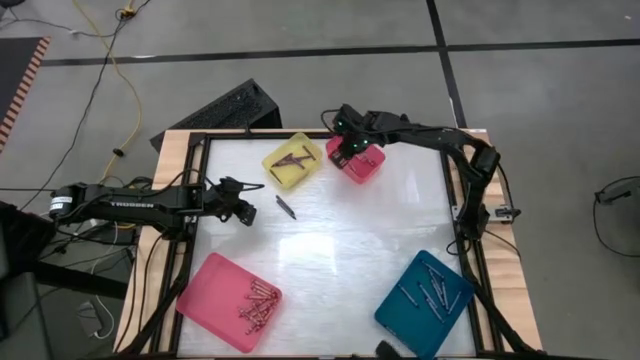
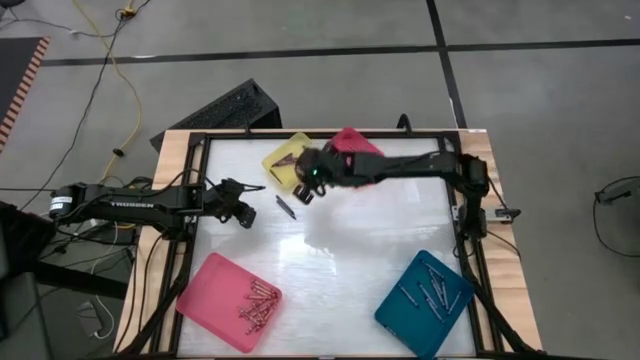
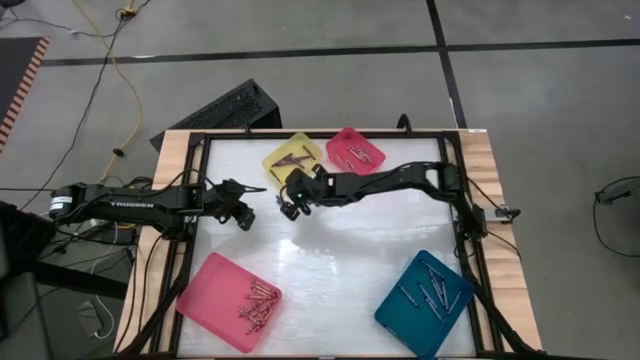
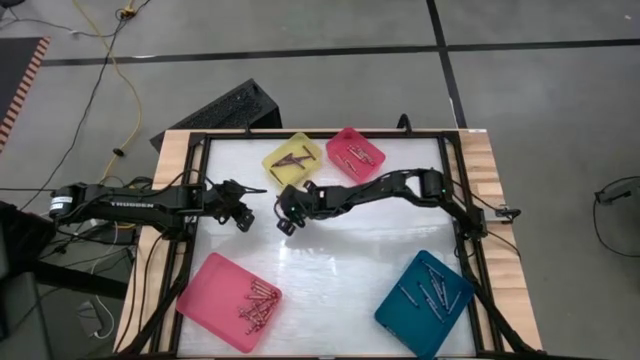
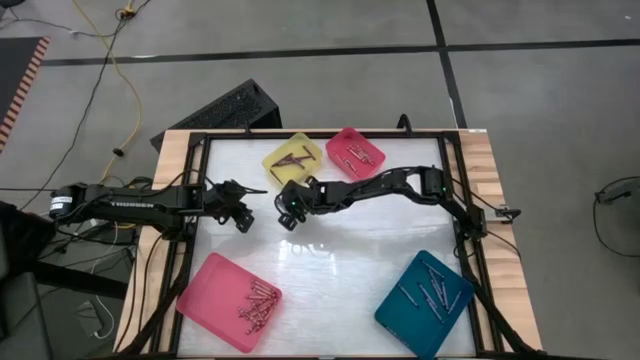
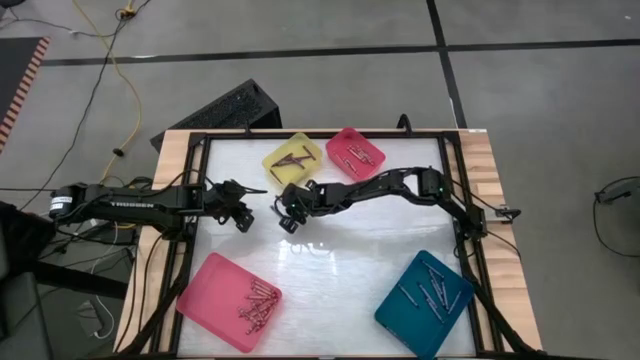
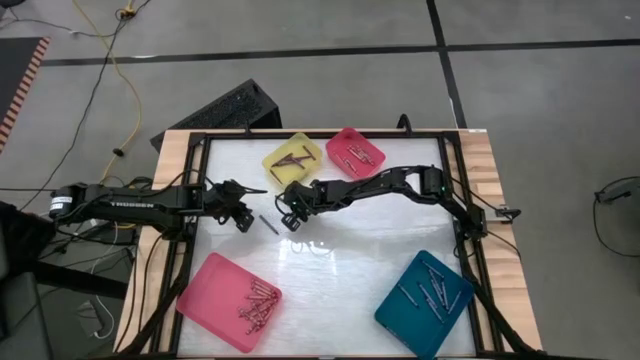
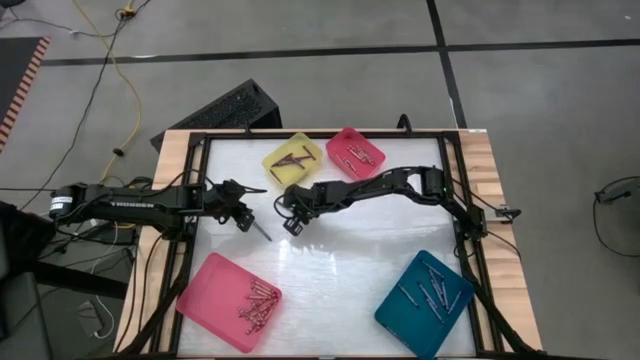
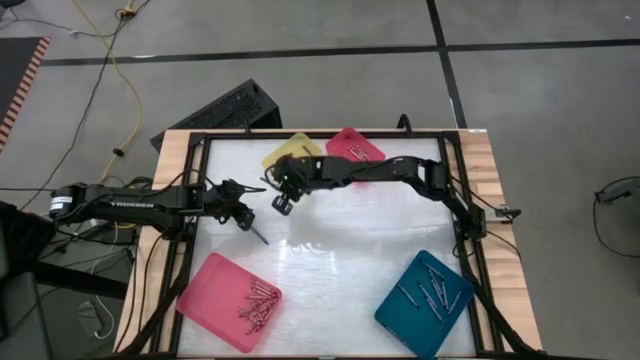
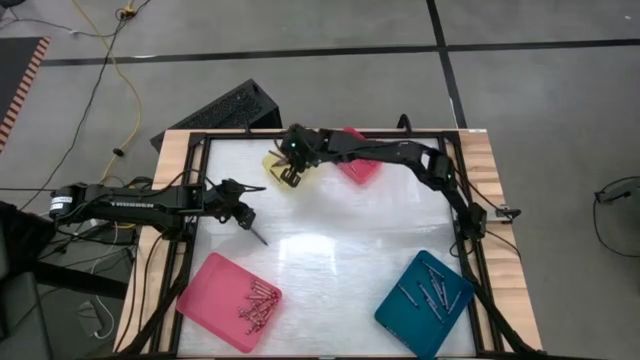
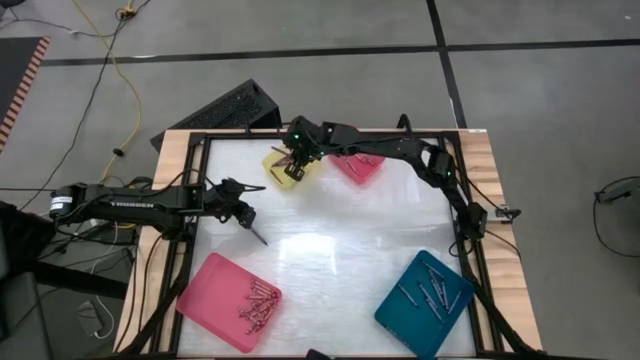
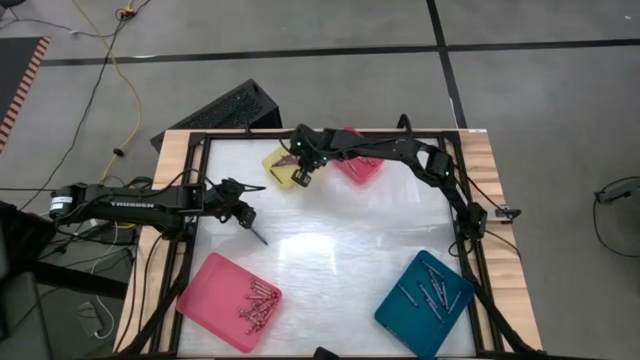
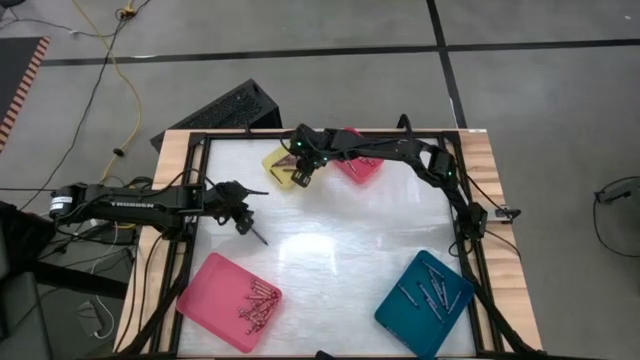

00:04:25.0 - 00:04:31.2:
Task: Sort crayons
Put the purple crayon into the yellow bin

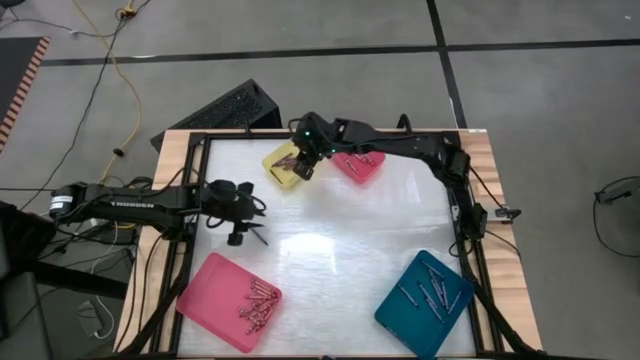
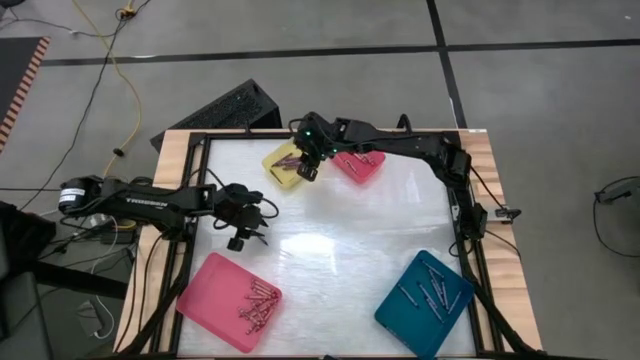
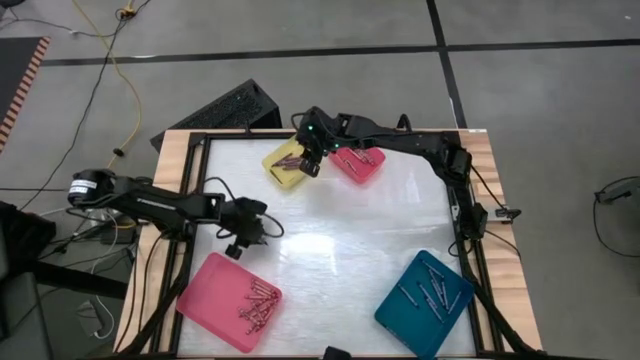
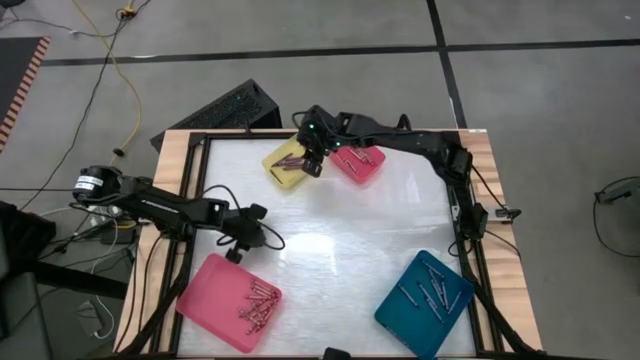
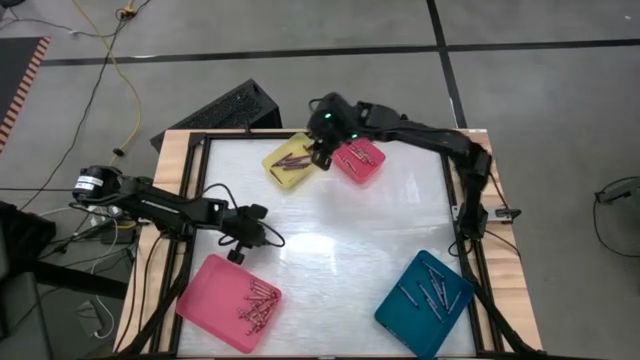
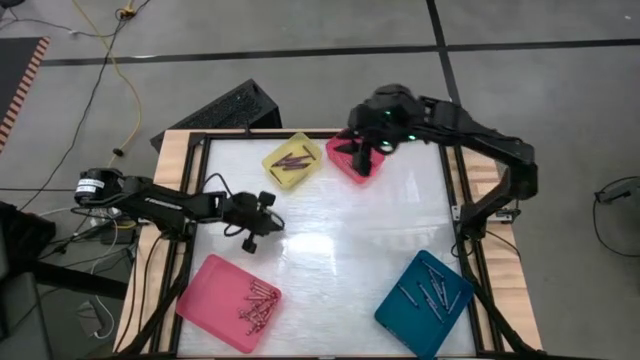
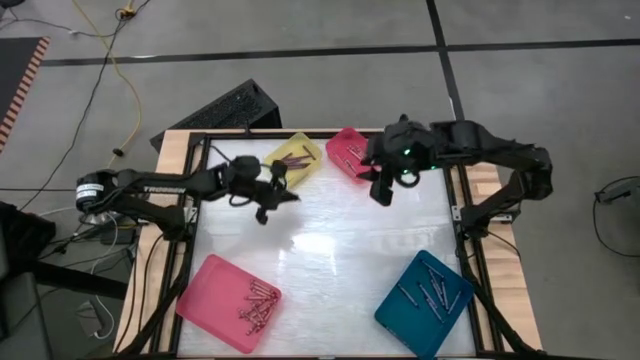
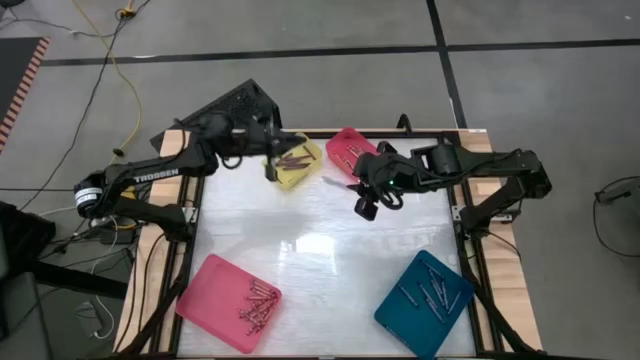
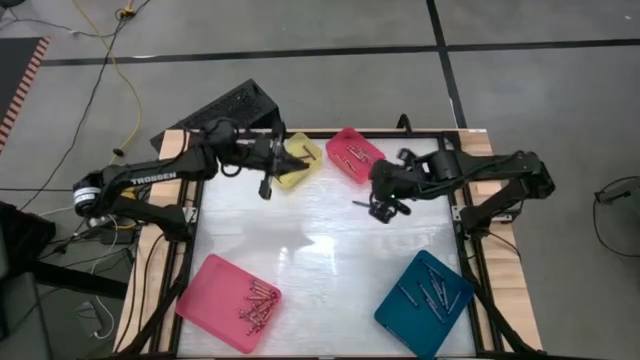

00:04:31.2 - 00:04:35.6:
Put the blue crayon into the blue bin

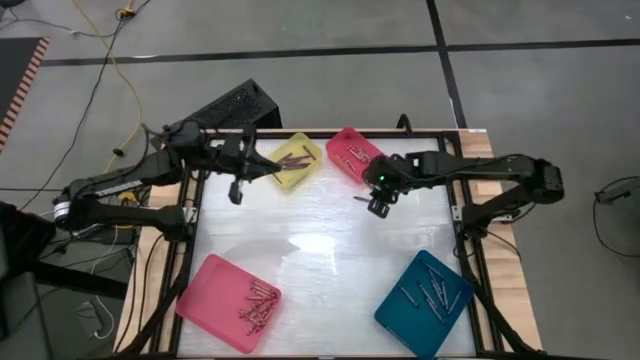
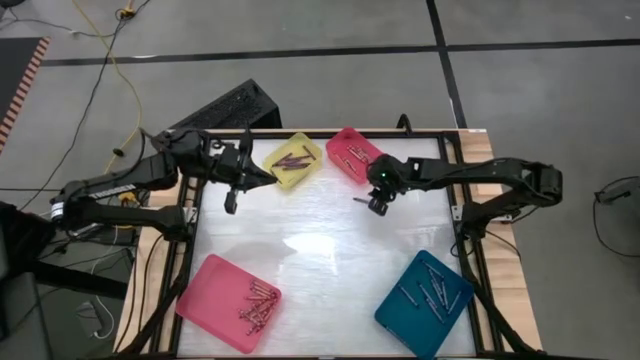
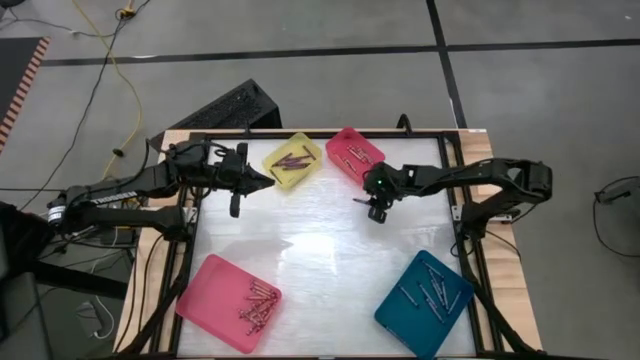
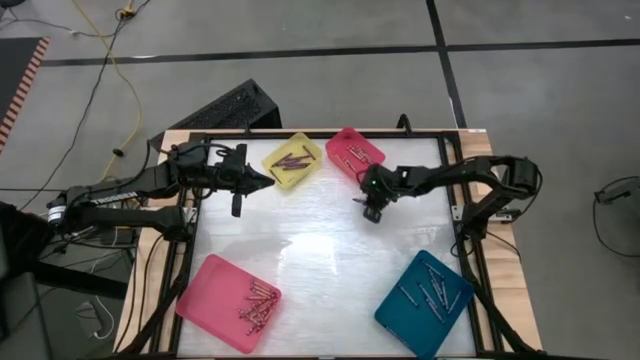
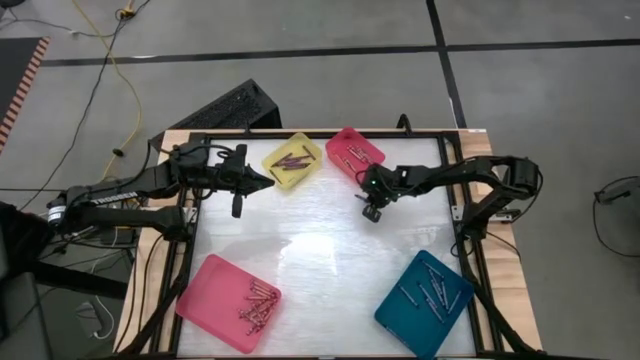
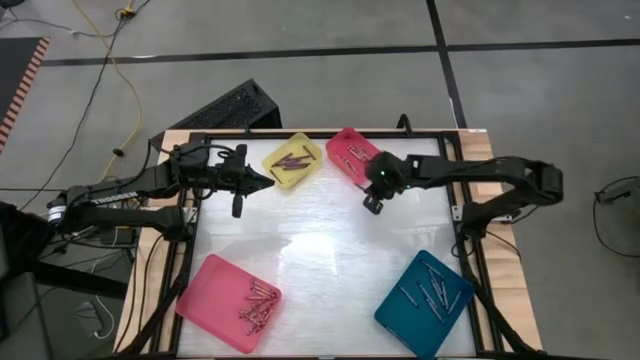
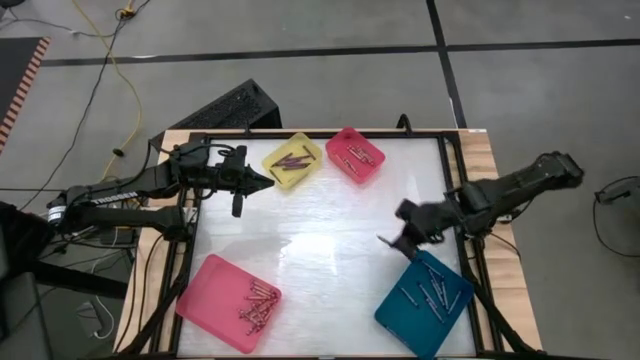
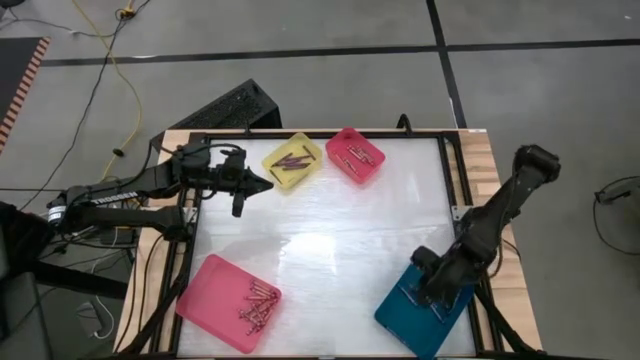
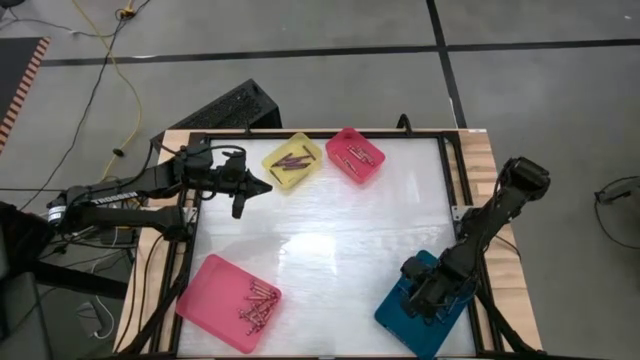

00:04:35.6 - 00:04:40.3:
Put the blue crayon into the blue bin

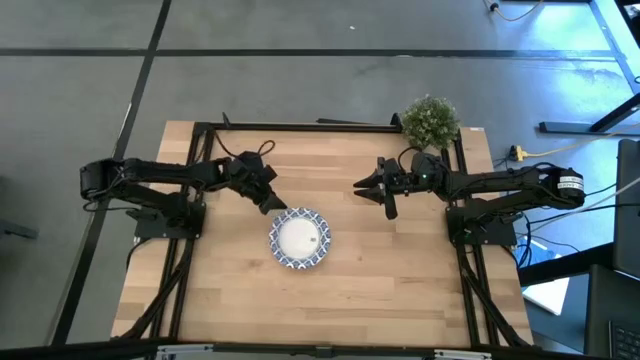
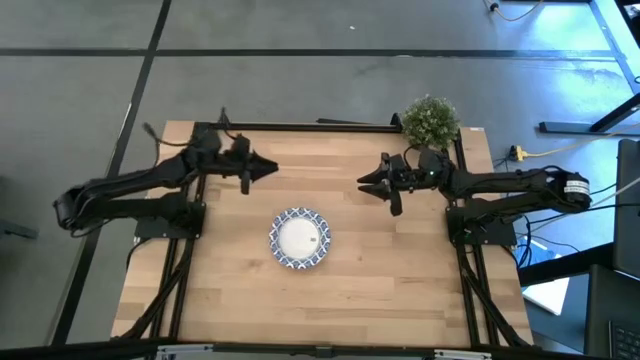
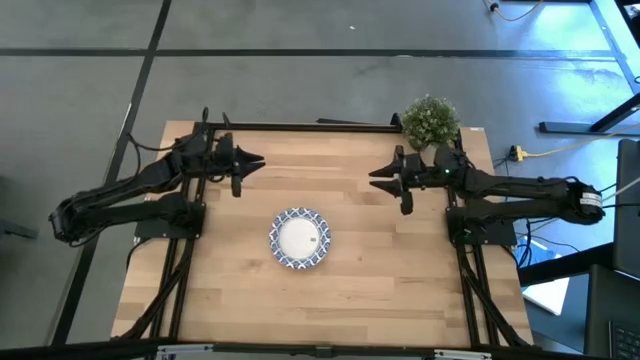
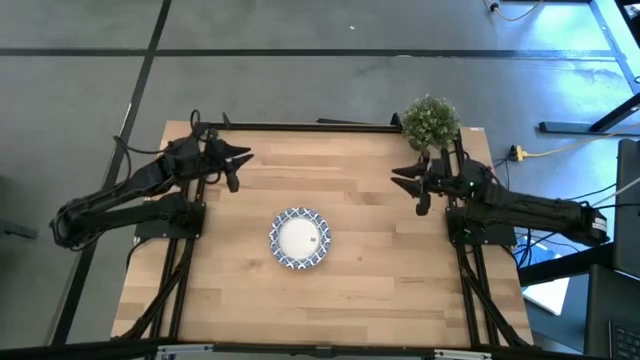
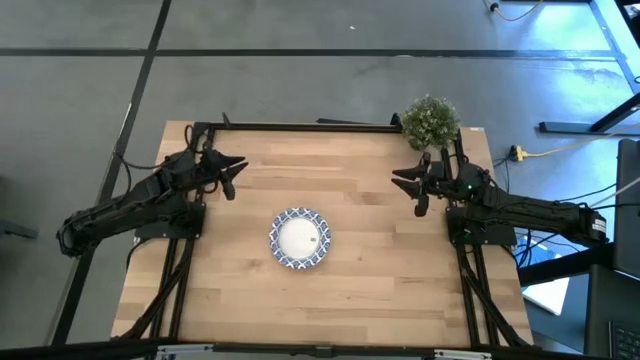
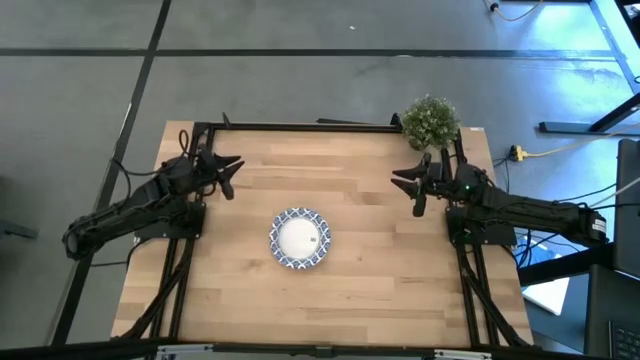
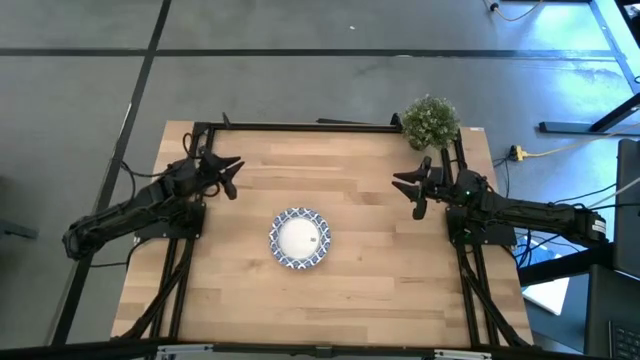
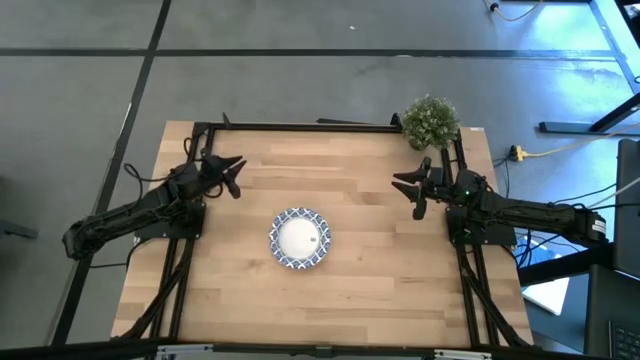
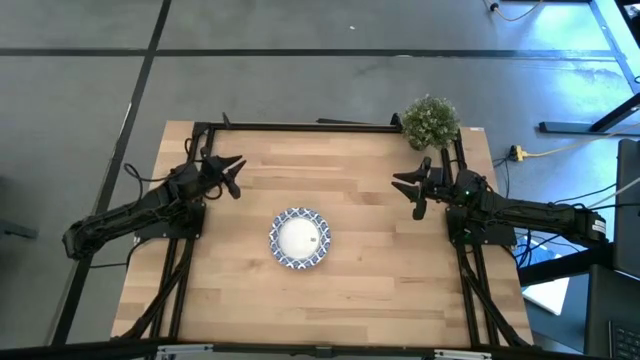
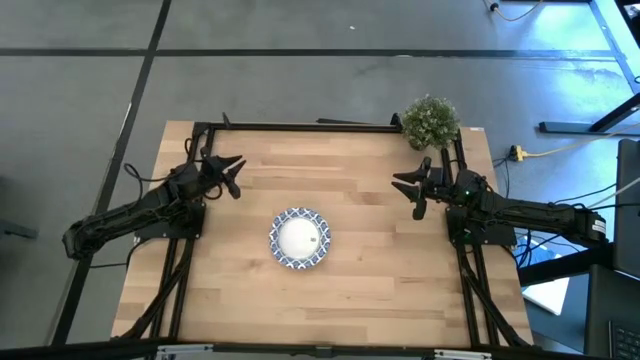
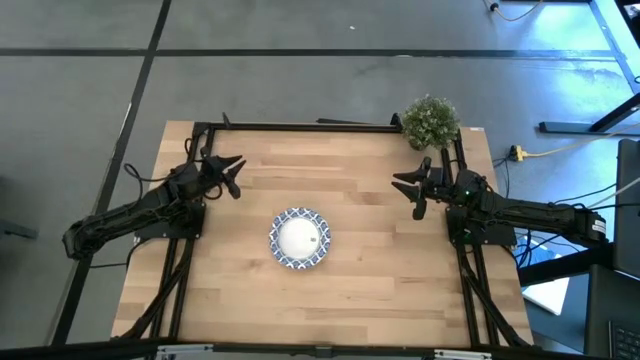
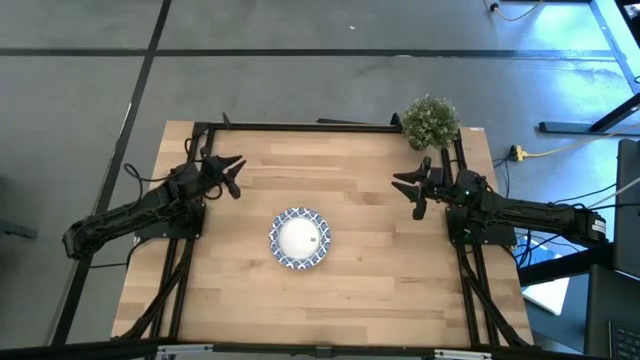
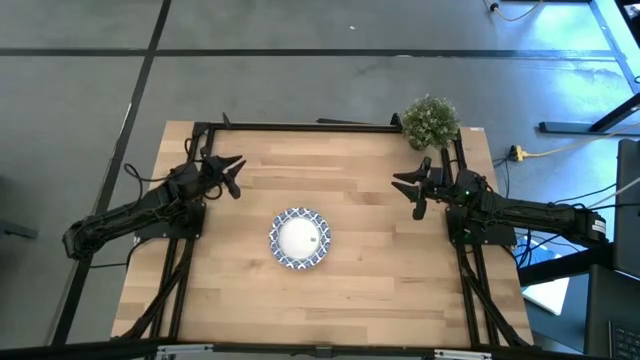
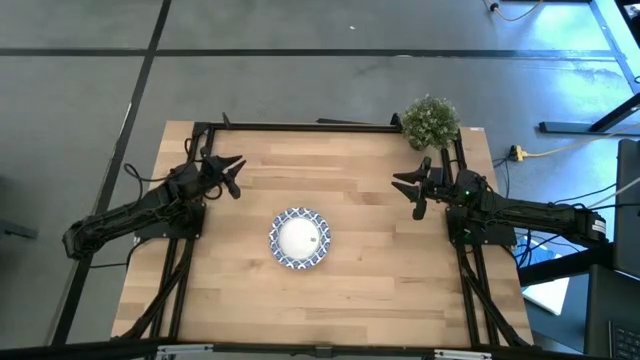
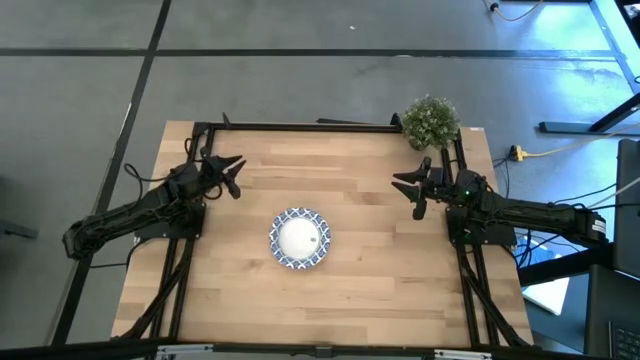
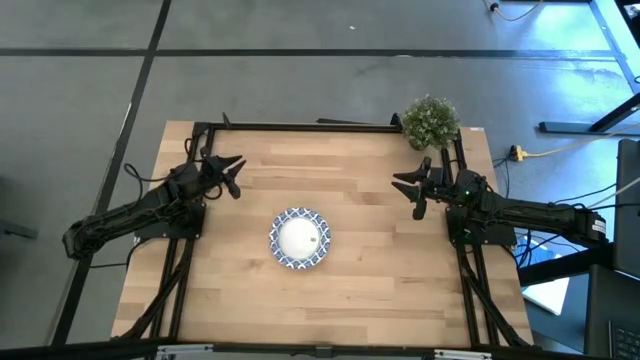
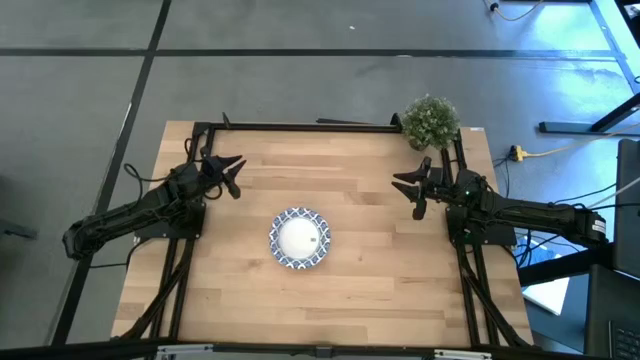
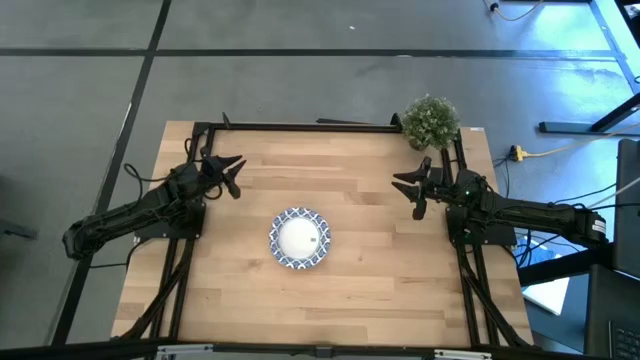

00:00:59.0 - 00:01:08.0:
Task: Nest bowls inside each other
Return to Home Position
